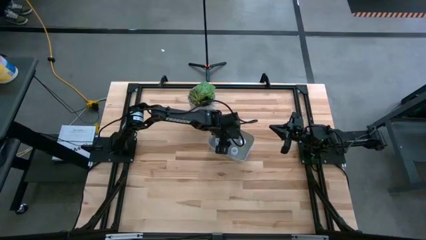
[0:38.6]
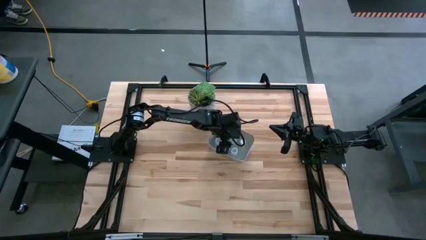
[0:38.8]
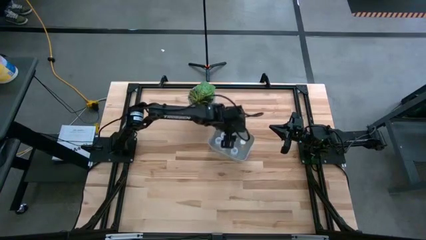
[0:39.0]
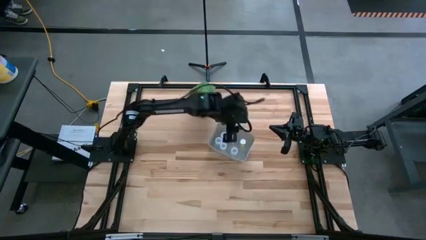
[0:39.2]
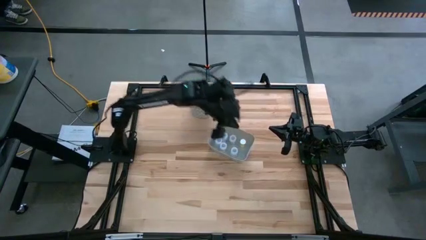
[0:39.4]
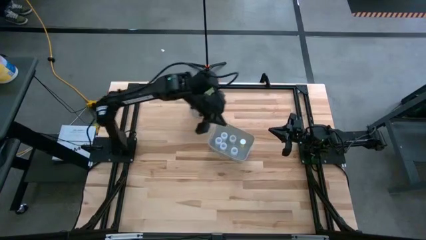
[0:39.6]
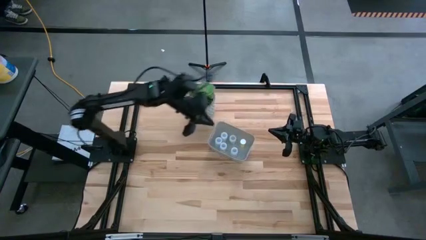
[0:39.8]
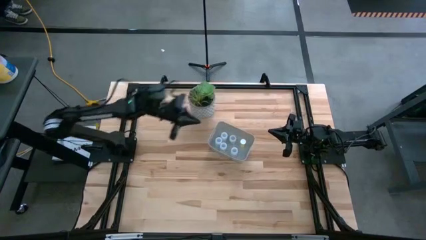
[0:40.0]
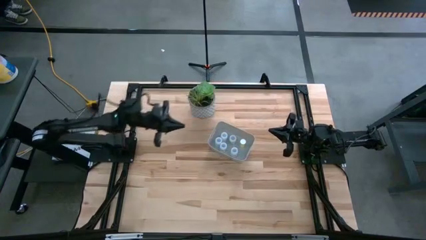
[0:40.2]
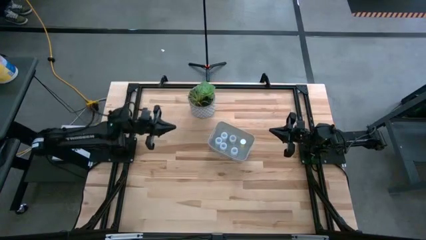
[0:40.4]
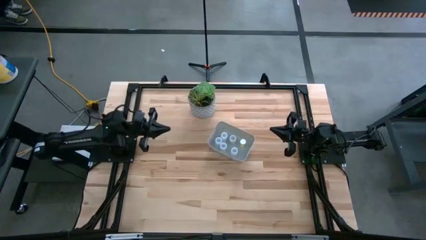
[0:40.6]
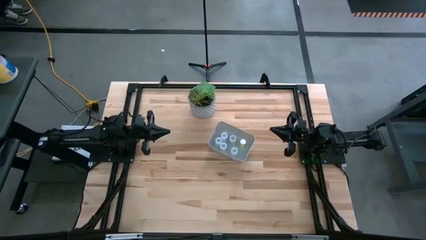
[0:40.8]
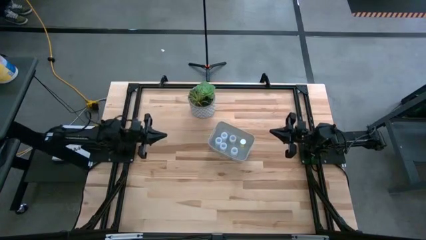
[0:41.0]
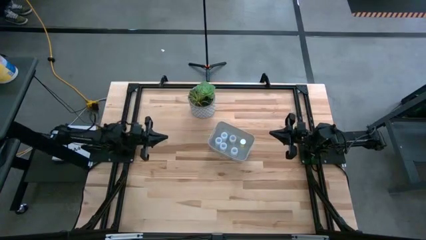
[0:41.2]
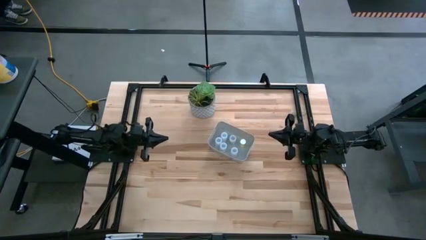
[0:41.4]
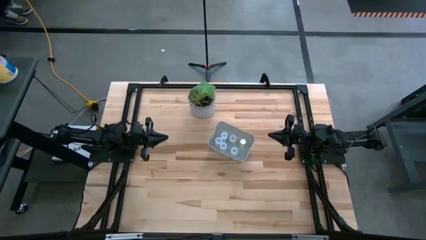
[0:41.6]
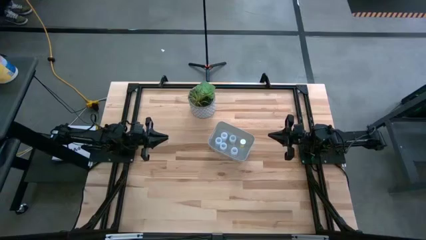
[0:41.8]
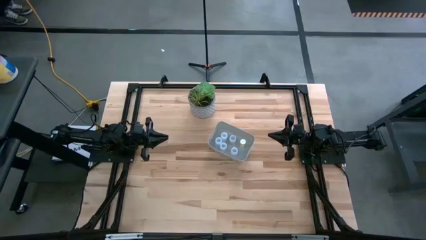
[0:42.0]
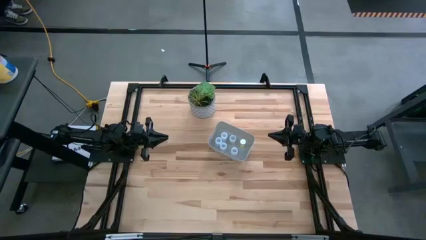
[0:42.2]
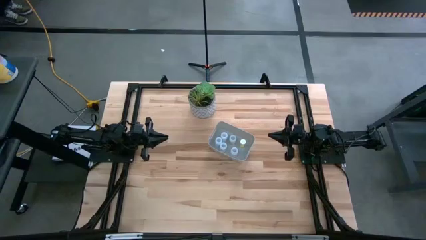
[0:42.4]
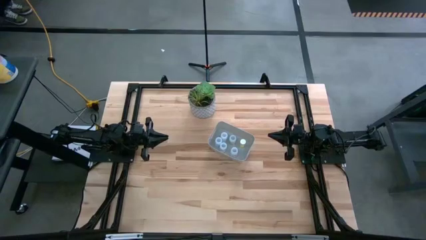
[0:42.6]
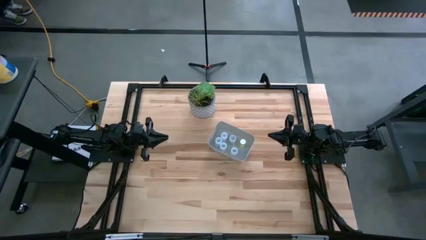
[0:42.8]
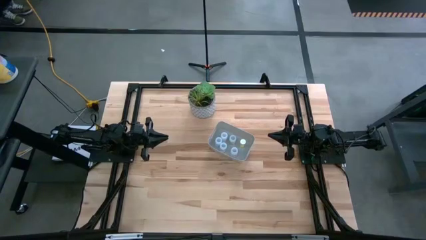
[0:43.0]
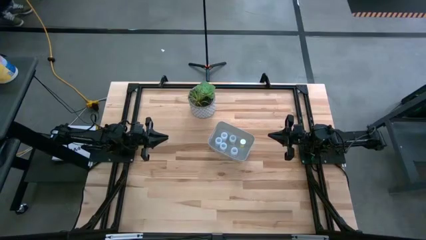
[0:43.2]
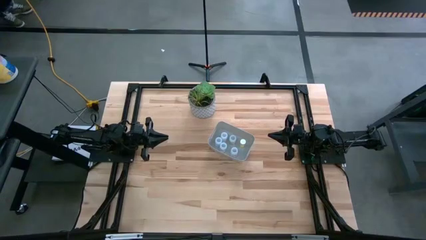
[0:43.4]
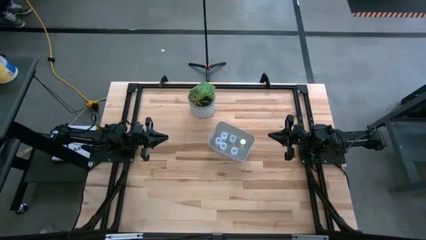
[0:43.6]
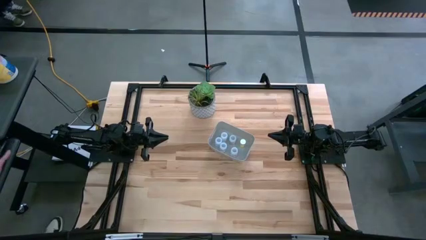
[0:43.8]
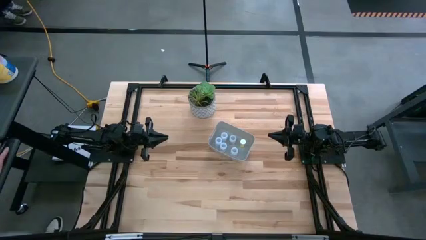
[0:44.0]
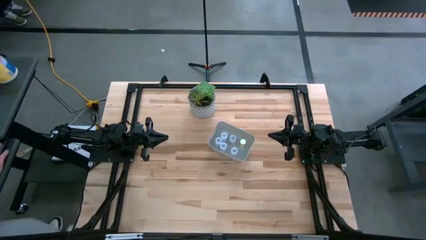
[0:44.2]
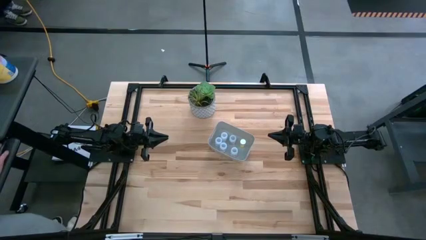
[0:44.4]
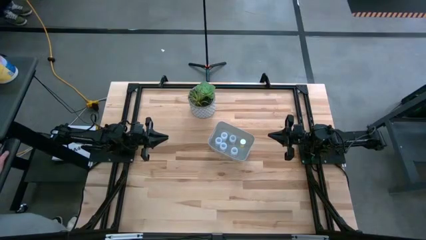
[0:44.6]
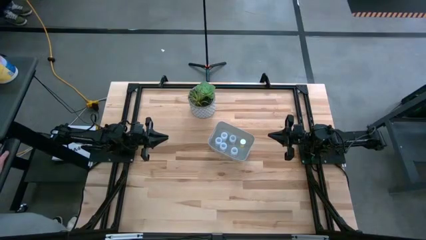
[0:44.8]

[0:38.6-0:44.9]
Task: Pick and place pill bottles into a basket
Return to Home Position

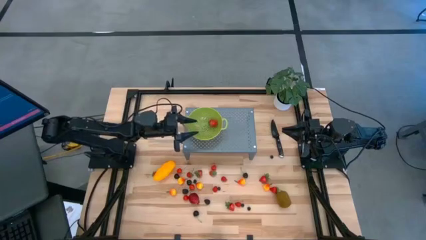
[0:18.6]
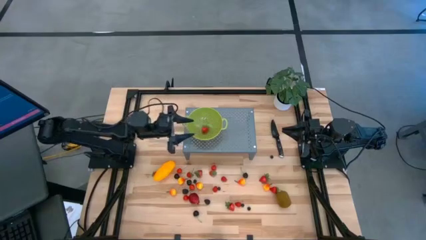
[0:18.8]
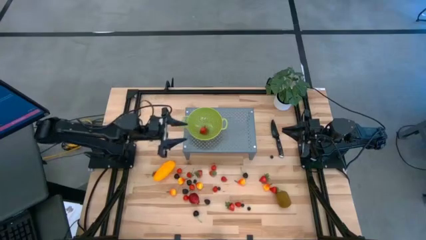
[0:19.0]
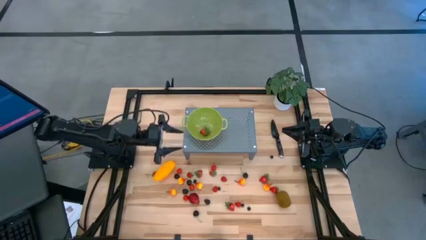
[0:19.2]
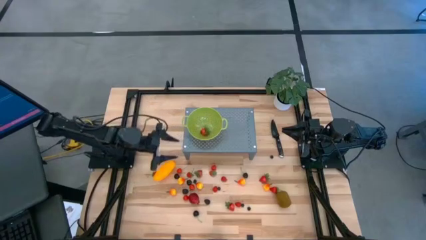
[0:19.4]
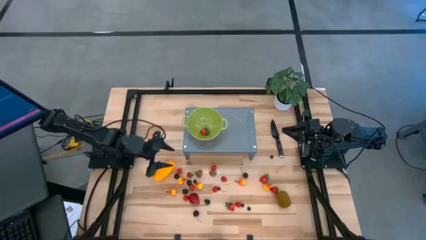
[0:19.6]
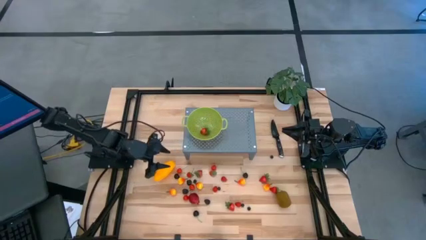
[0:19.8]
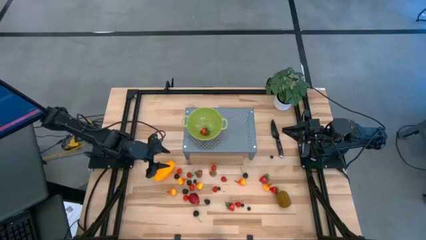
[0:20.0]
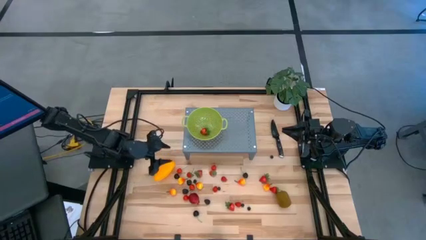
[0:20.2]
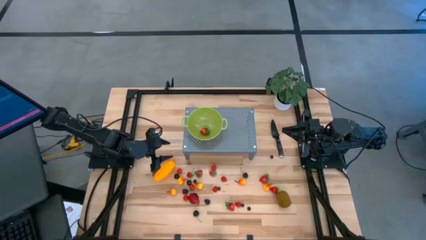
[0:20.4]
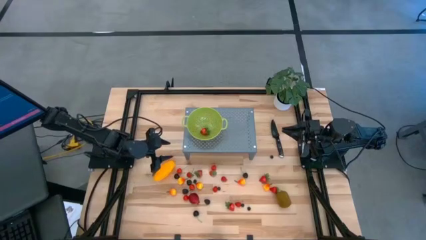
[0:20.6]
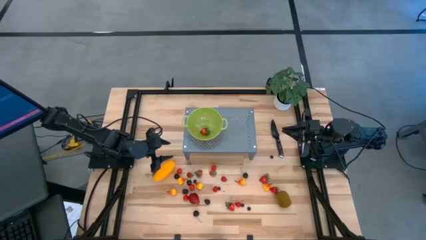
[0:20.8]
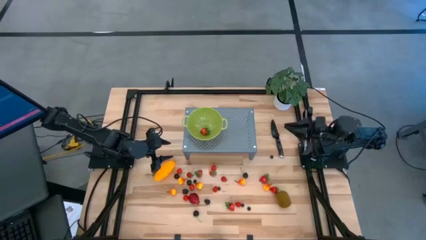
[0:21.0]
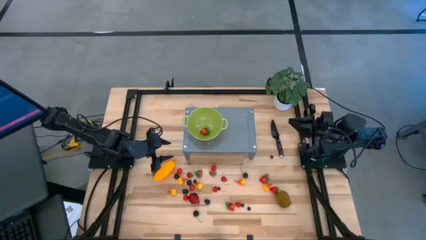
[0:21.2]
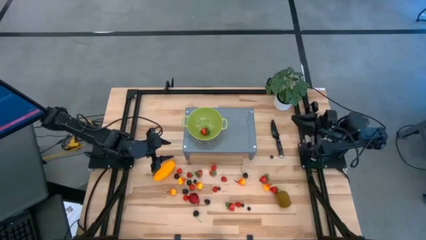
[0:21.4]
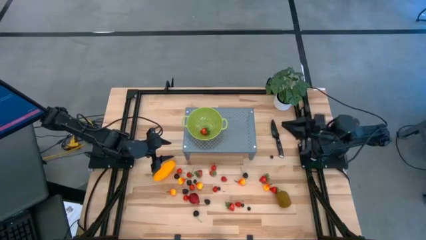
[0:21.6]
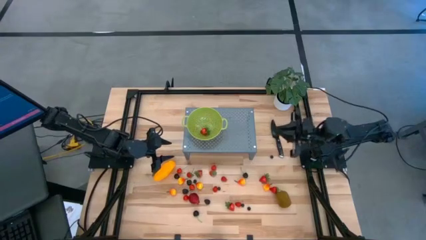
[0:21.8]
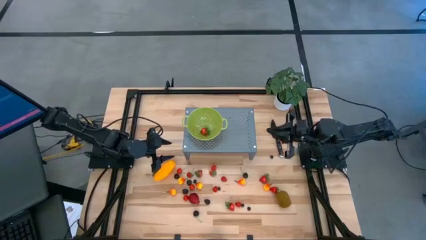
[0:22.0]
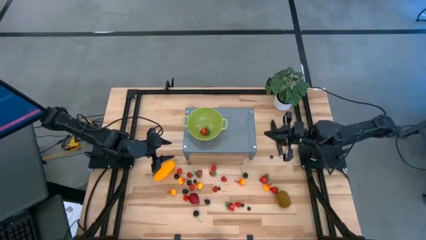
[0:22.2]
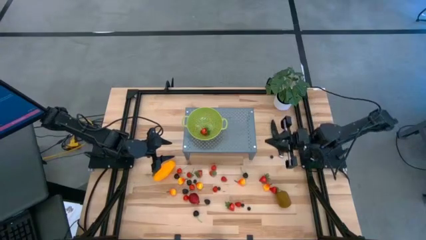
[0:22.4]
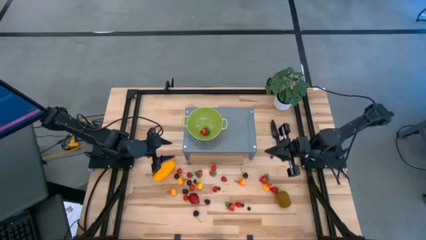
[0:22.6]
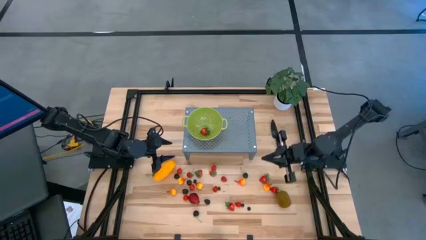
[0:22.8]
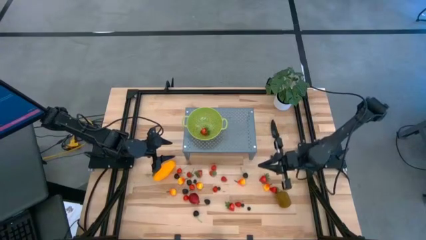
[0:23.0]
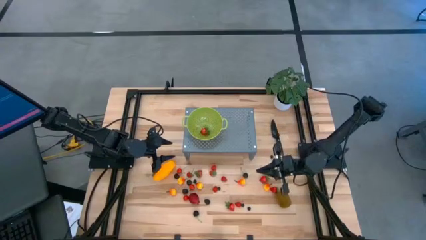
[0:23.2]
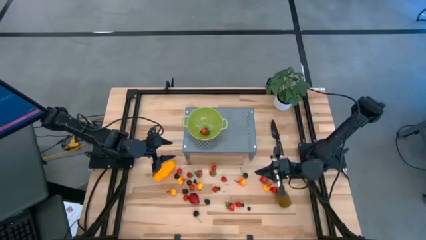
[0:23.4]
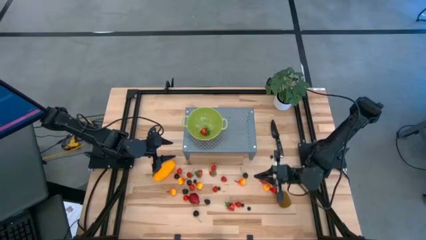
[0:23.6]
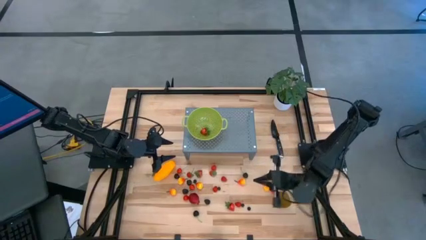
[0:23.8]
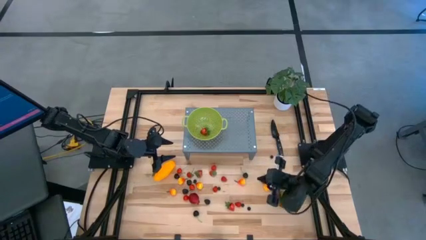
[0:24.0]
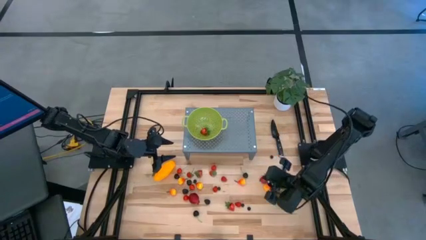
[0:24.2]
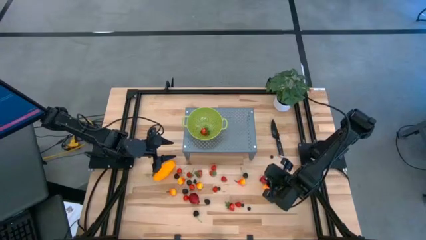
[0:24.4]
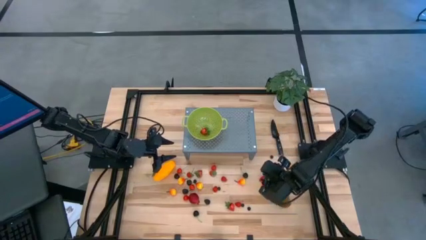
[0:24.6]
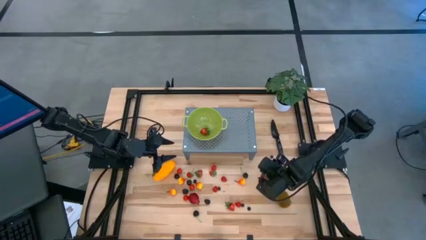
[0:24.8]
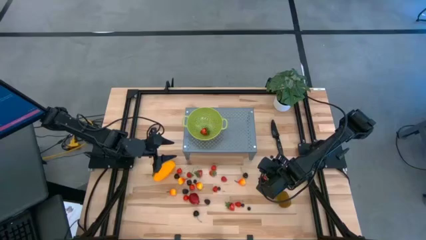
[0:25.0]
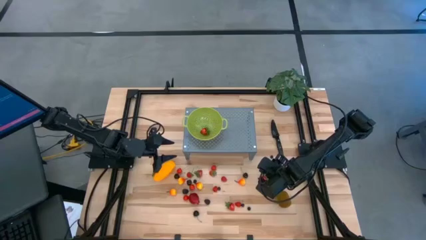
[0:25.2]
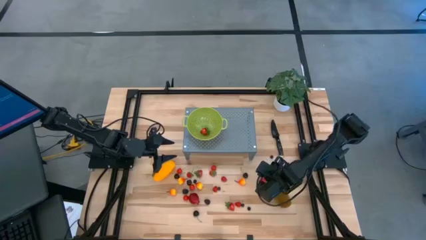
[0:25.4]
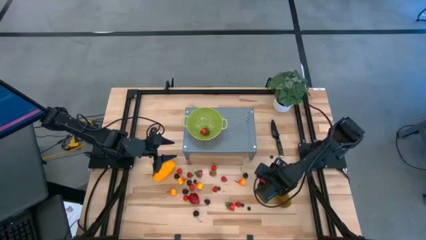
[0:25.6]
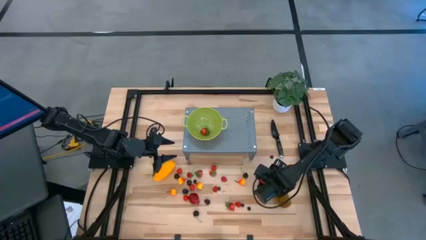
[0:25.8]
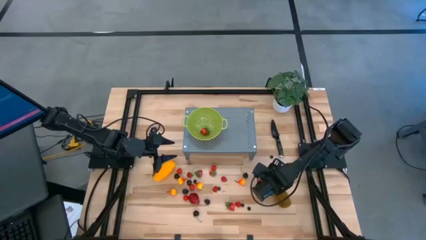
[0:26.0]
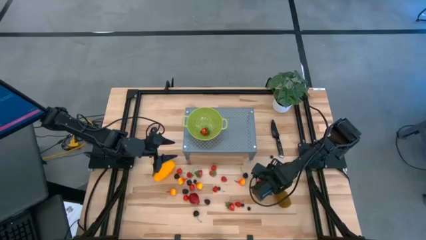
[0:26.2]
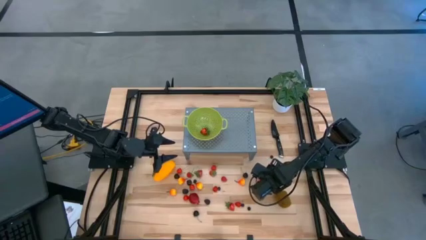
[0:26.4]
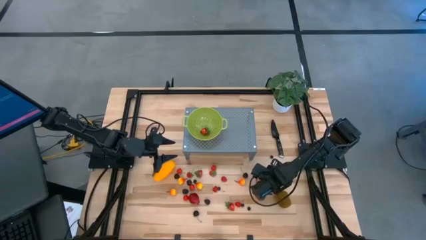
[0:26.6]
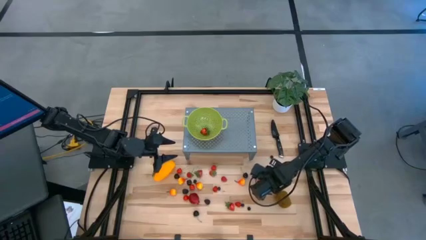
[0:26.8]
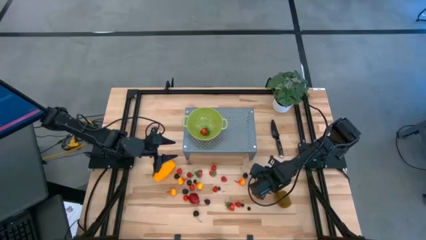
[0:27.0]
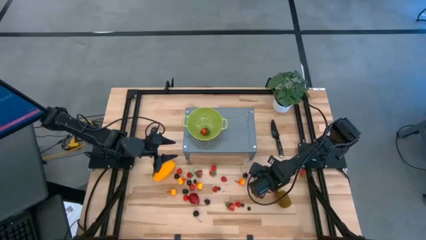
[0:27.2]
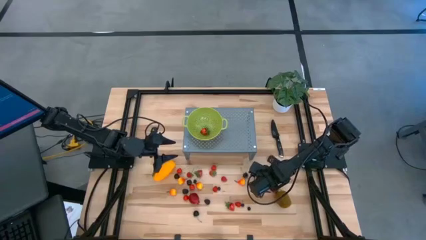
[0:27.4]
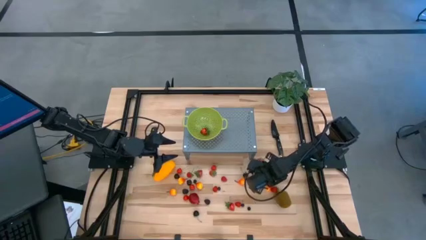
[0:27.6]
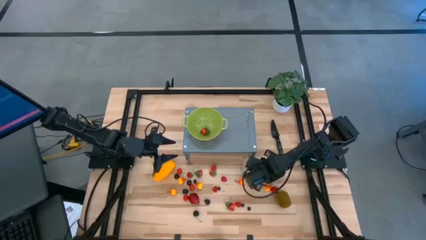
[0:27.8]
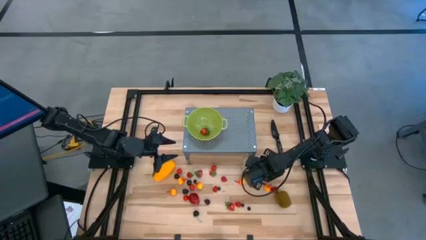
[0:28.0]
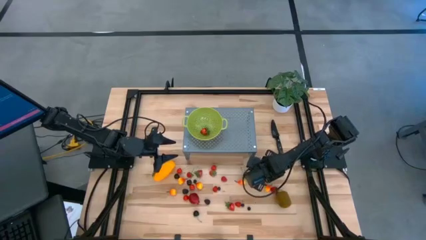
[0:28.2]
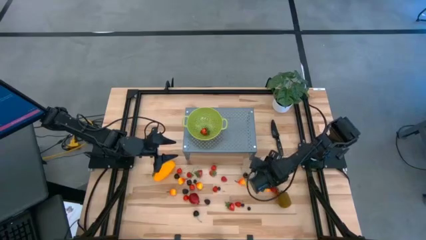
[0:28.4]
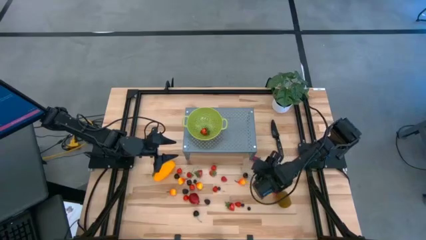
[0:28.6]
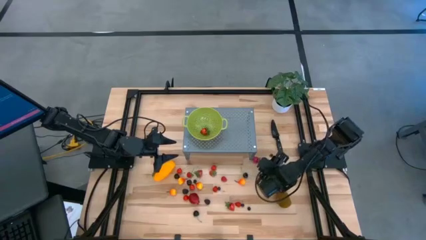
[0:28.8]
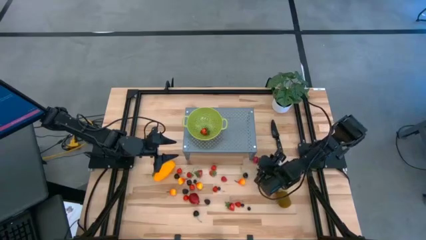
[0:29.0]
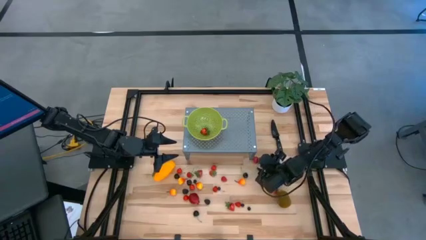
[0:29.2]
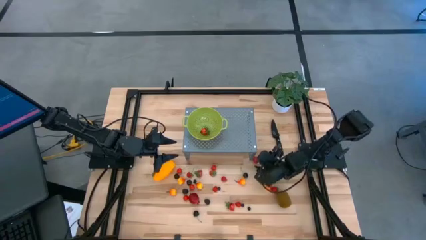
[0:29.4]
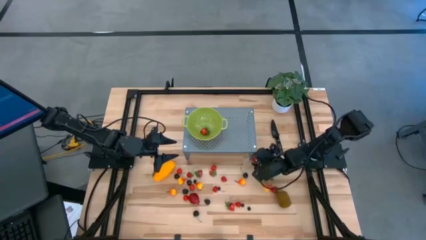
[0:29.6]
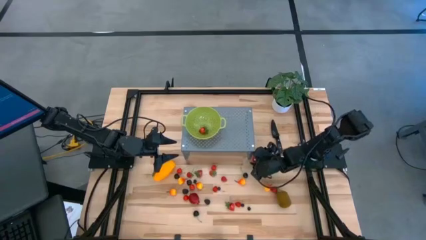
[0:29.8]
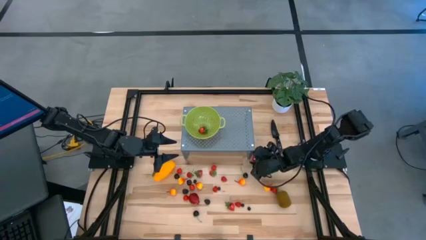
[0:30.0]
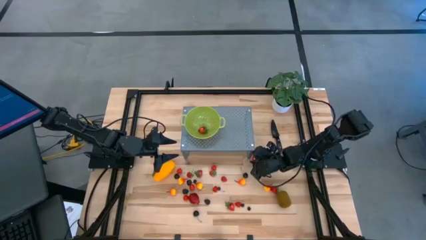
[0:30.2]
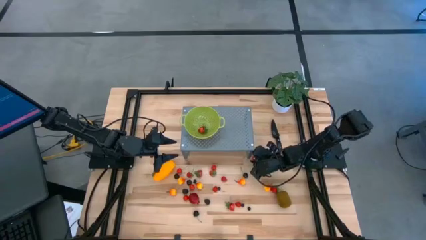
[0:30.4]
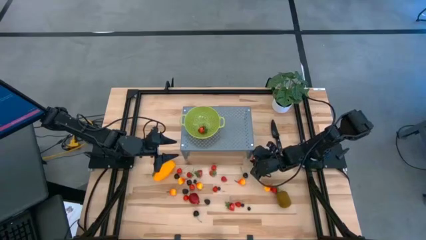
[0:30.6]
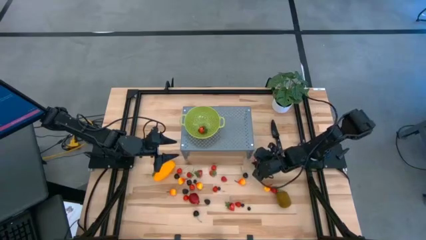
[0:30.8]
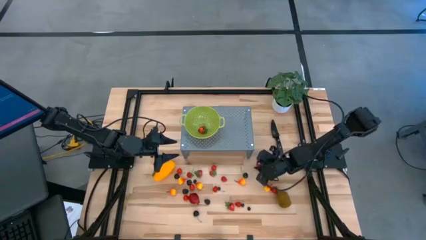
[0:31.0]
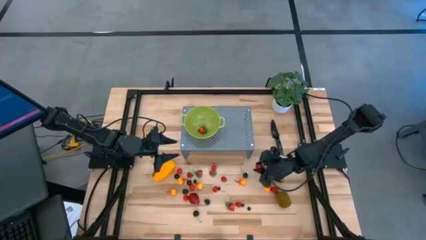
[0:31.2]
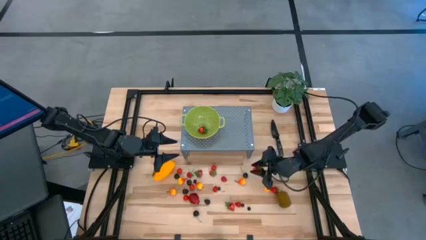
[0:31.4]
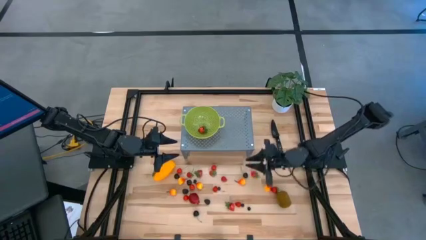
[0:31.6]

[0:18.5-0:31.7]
Task: Pick & Place Fruit
Put the strawberry into the green strainer bowl on the shelf
